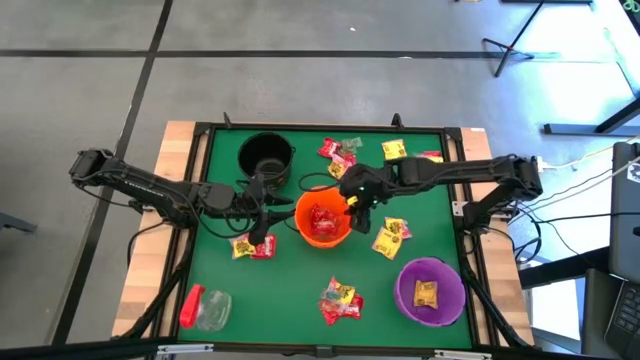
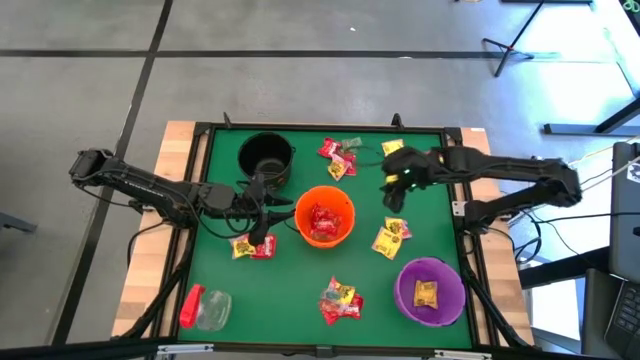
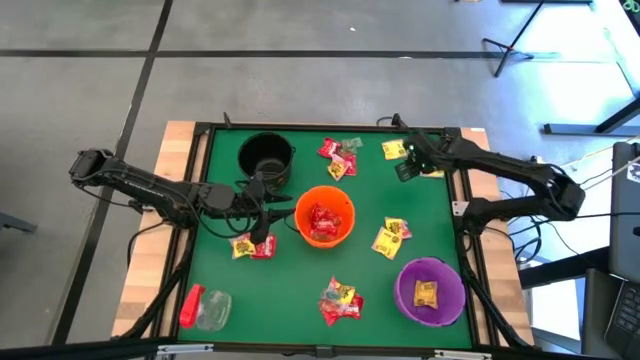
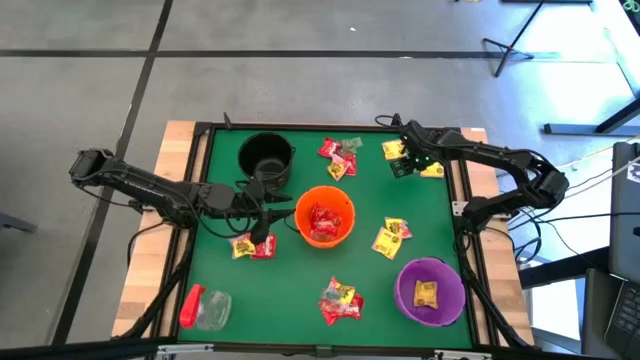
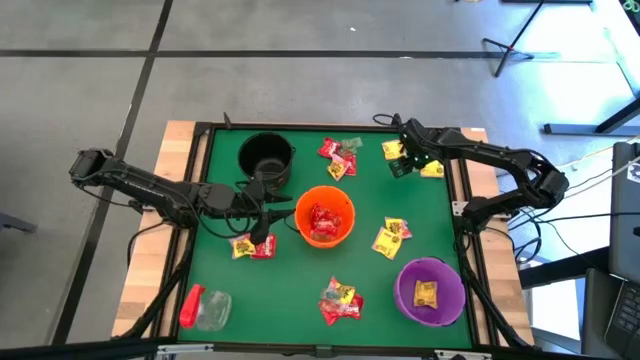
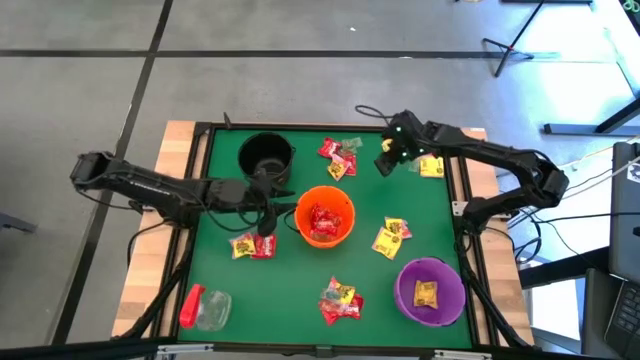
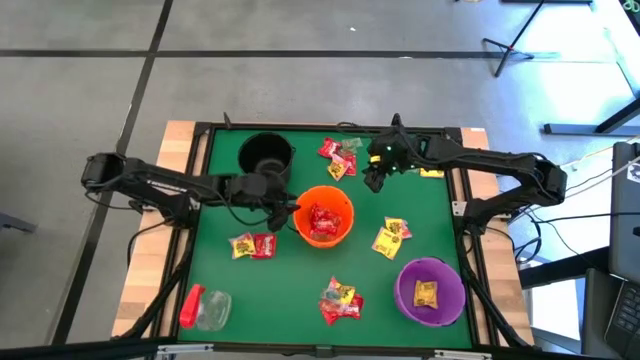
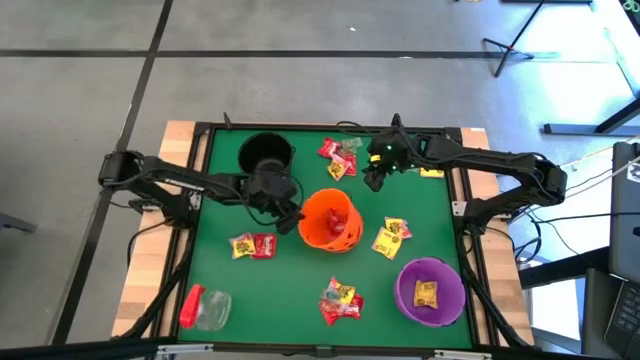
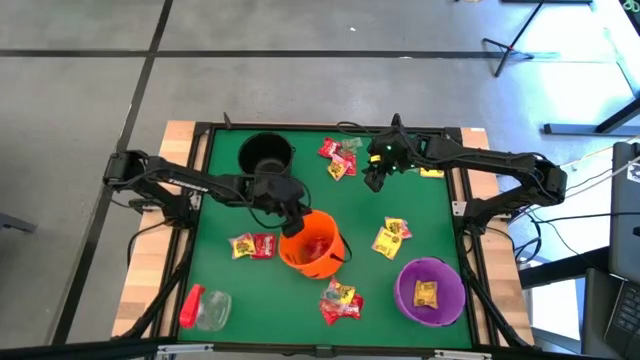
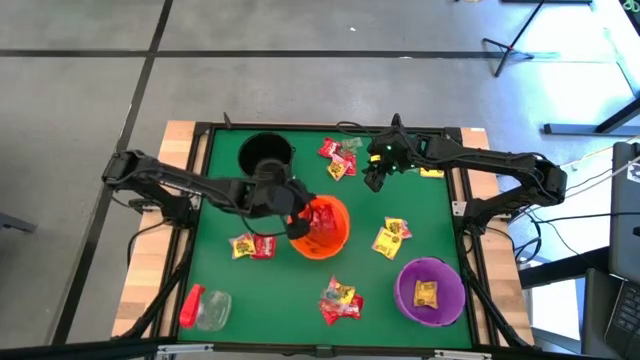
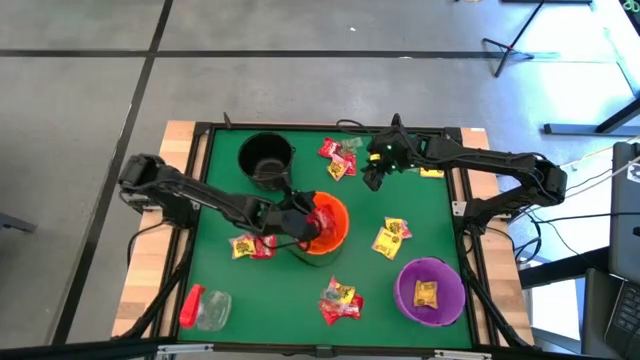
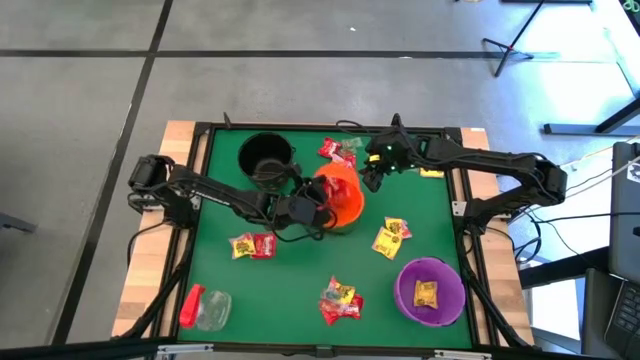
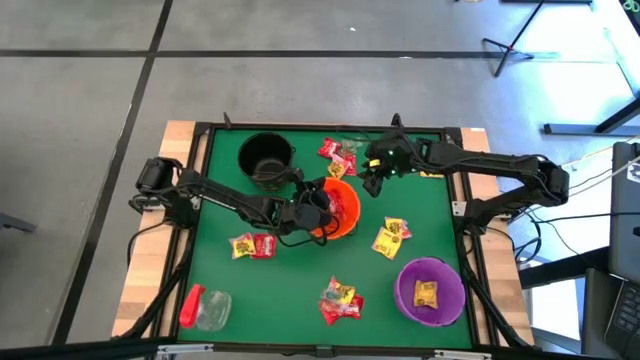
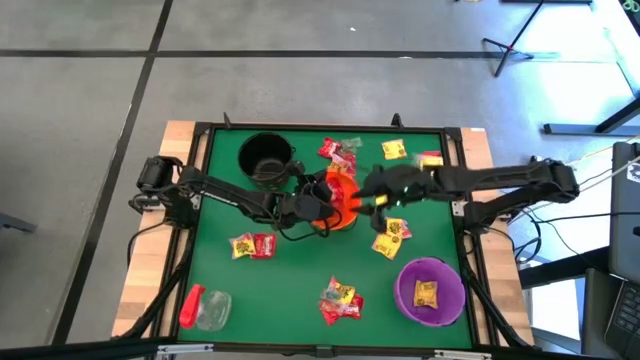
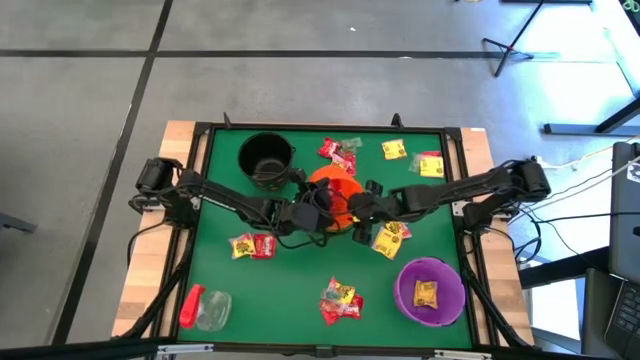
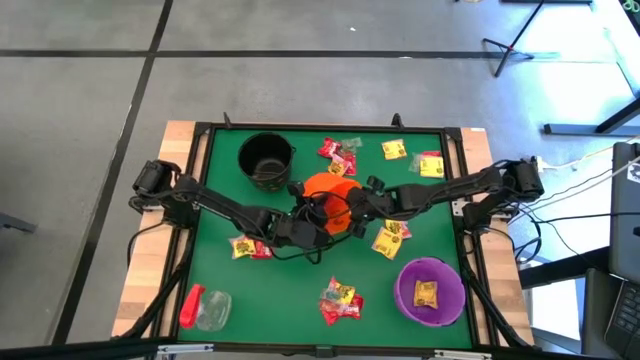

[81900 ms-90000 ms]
Task: Sort candy
Pour the candies from the orange bin on the table

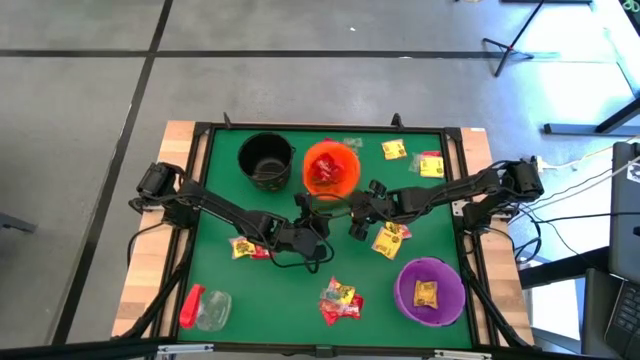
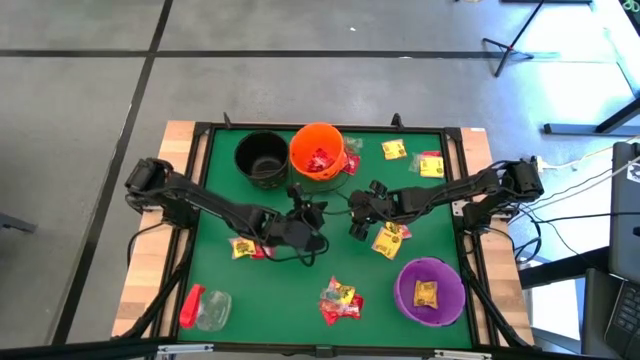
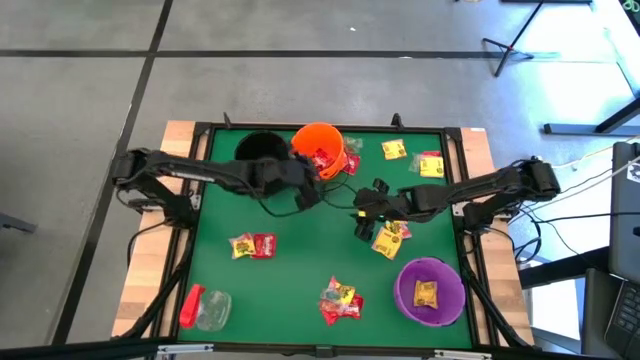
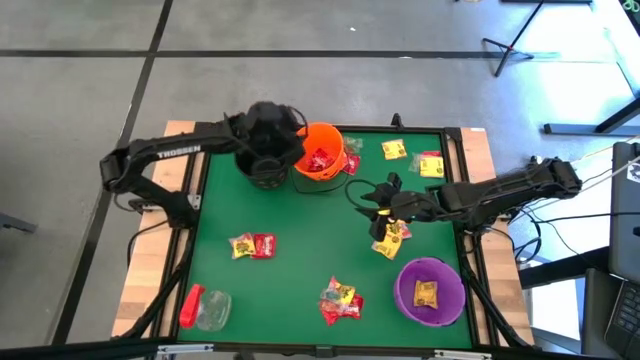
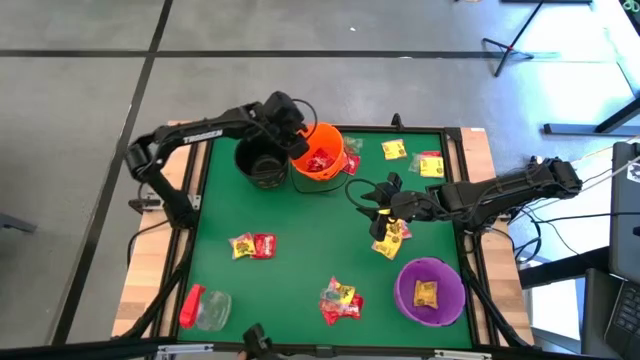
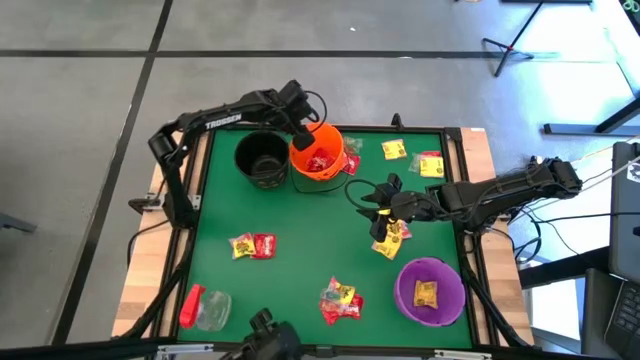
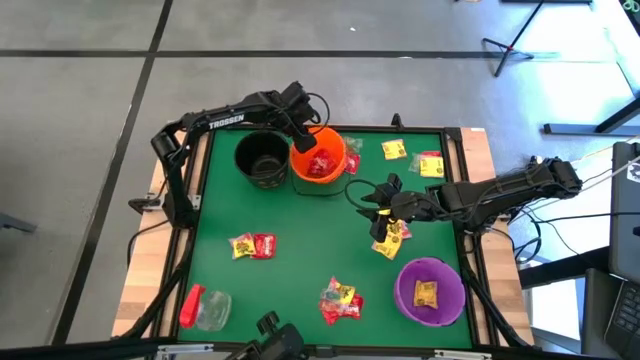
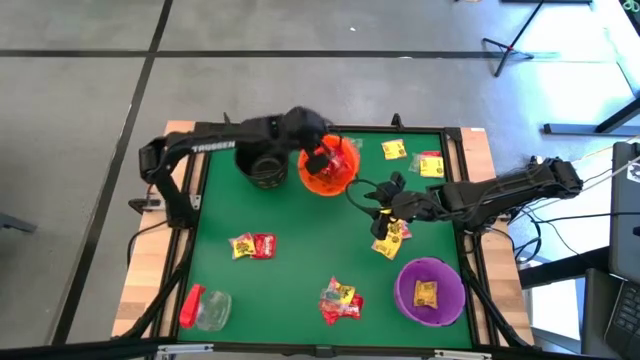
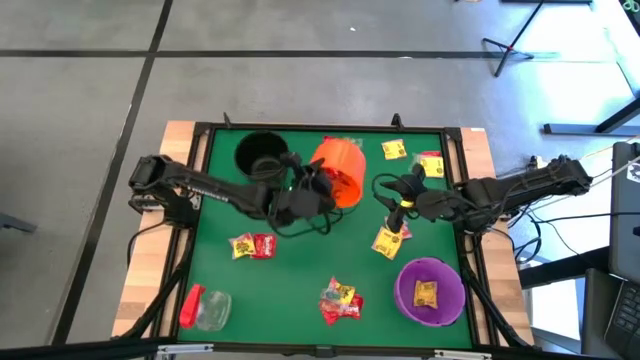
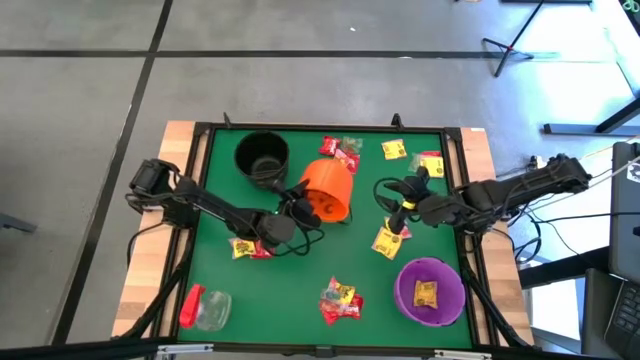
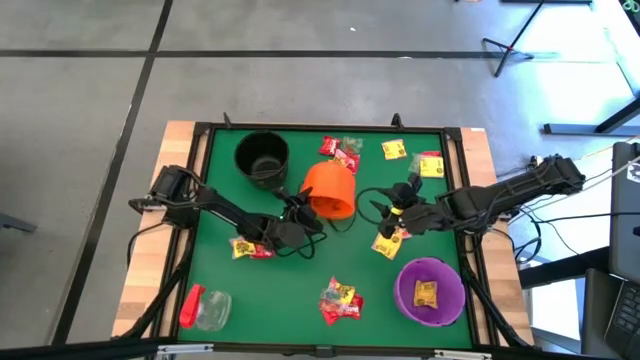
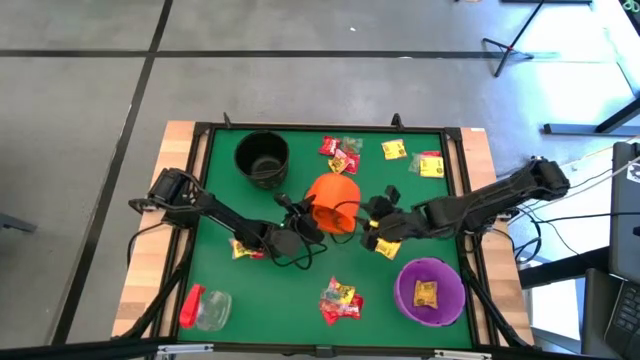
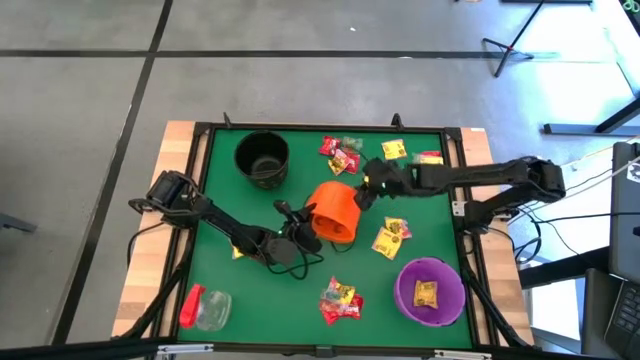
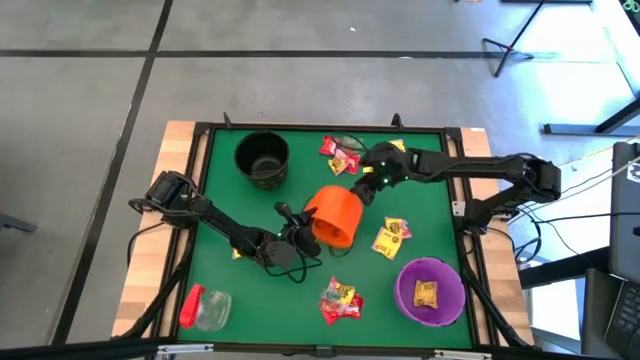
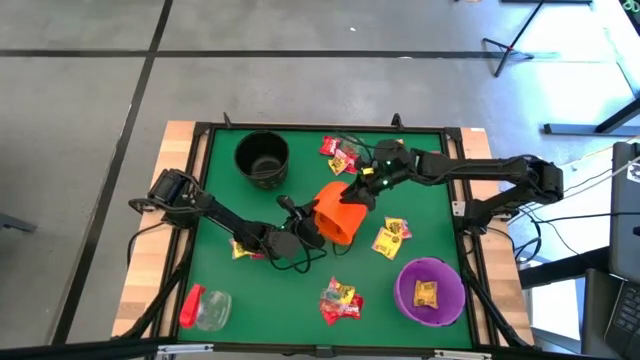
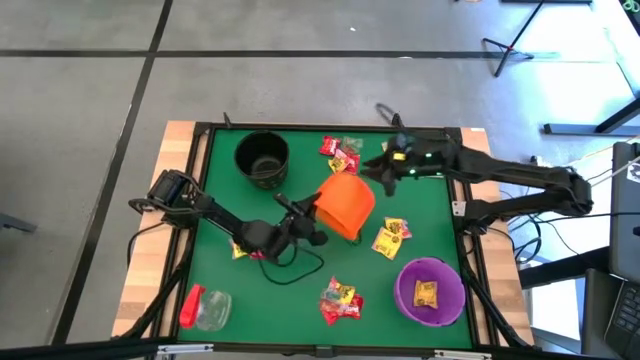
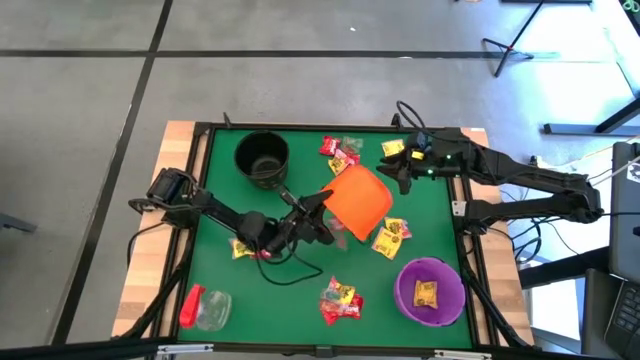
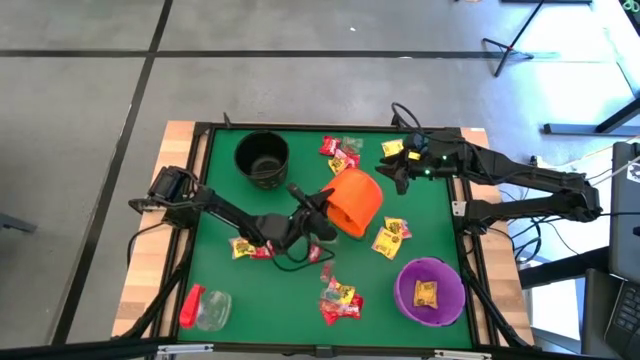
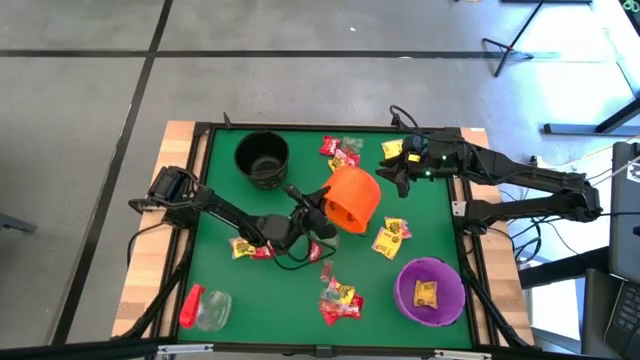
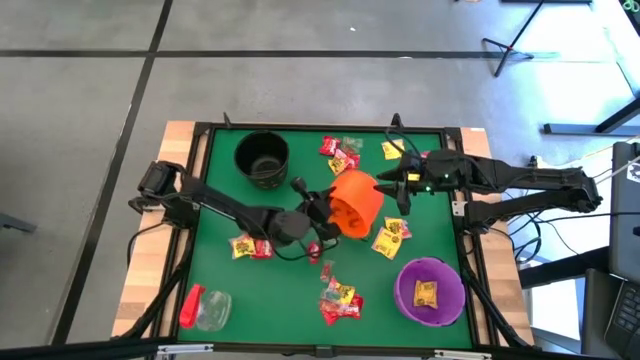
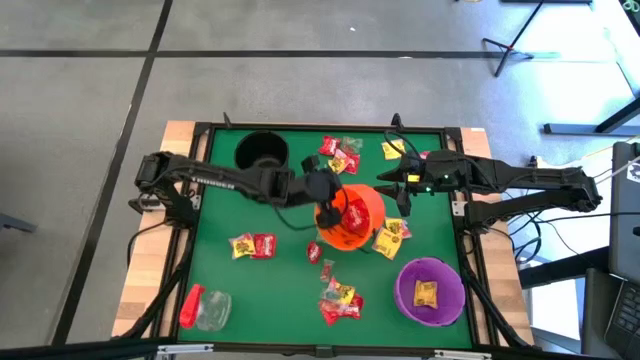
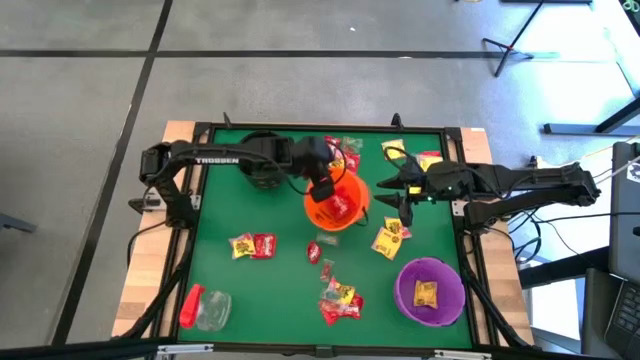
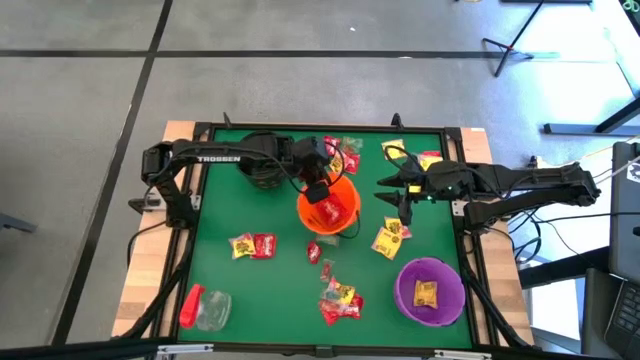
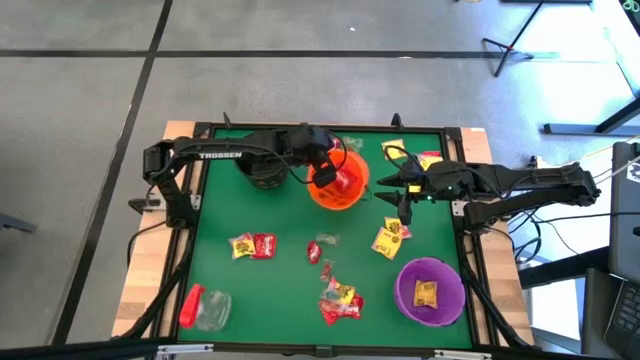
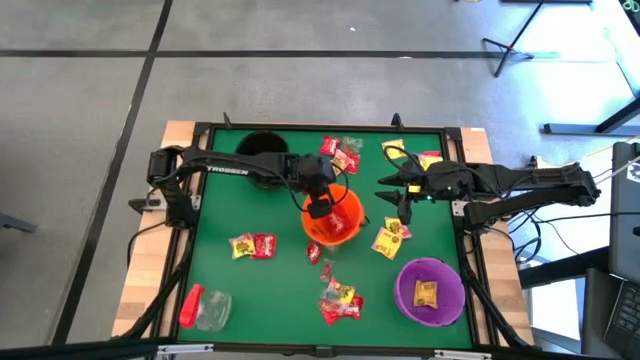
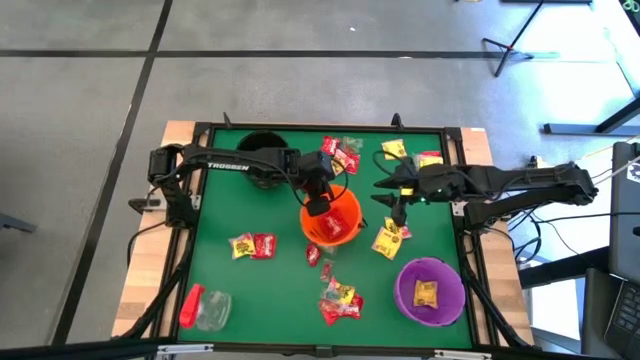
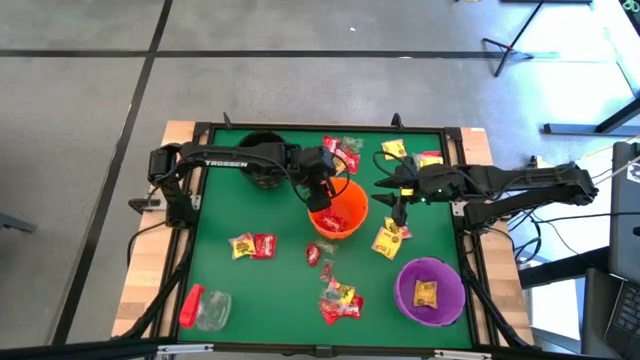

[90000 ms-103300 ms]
Pour the candies from the orange bin on the table

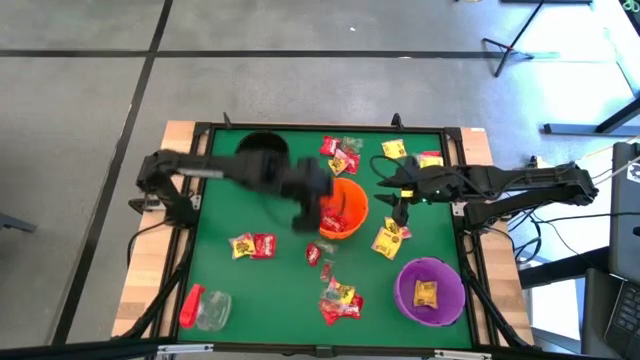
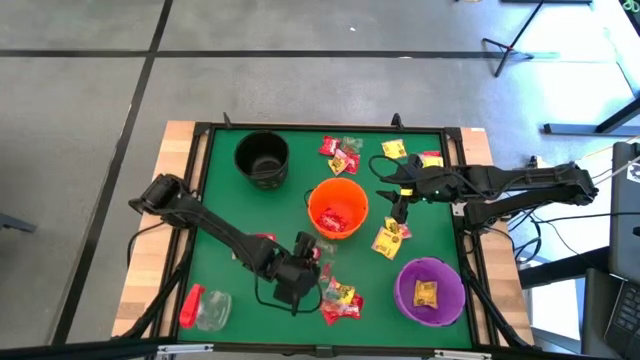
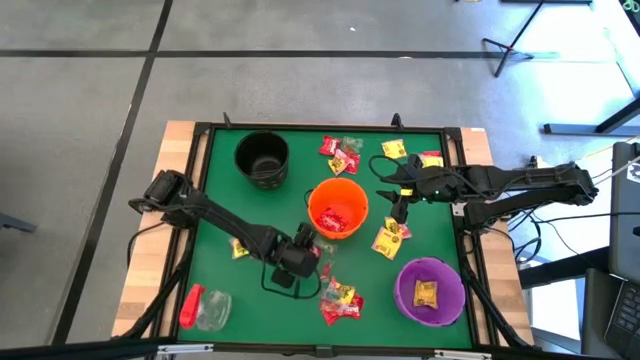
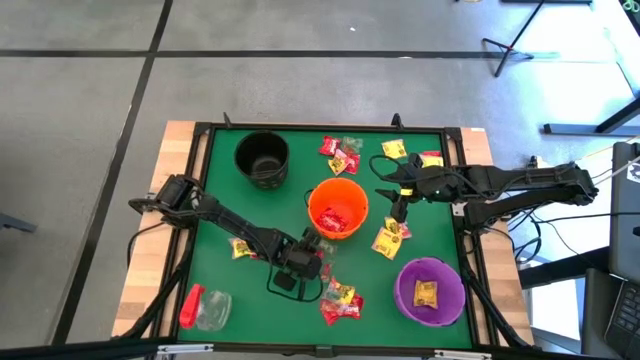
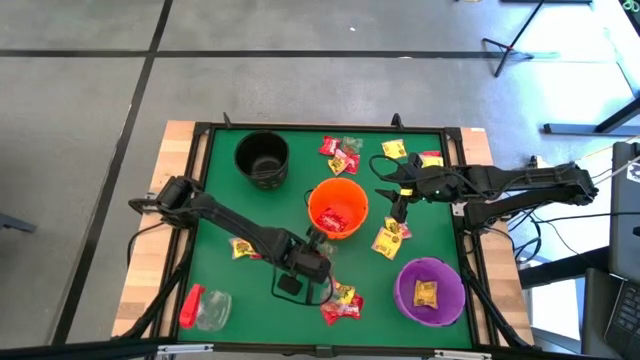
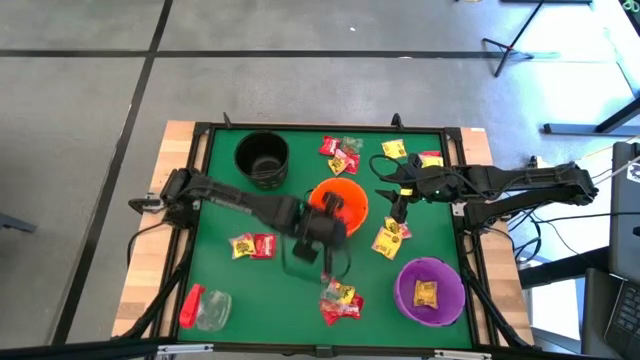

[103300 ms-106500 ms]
Put the red candy into the orange bin
